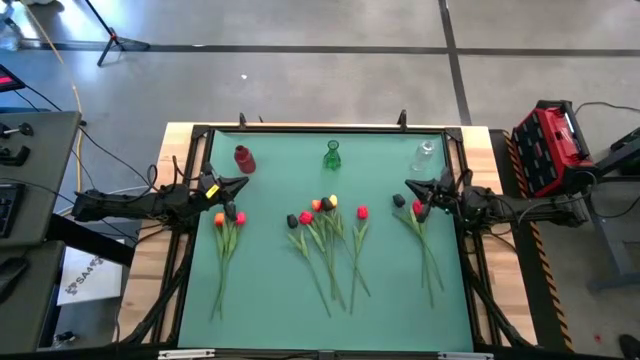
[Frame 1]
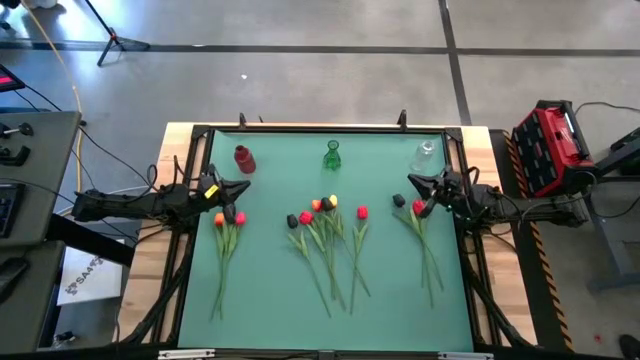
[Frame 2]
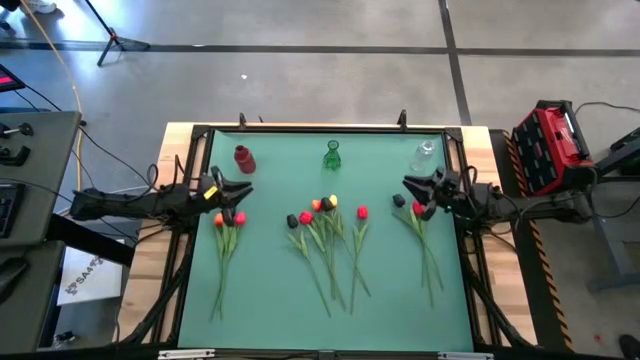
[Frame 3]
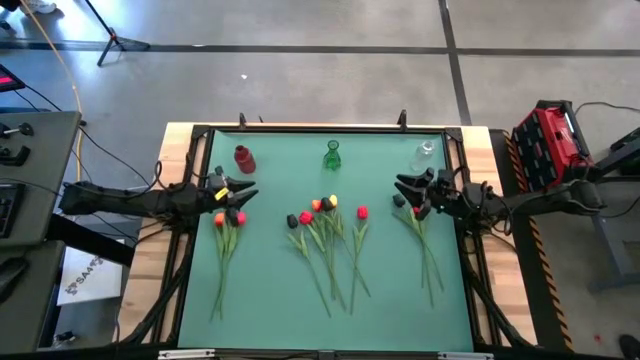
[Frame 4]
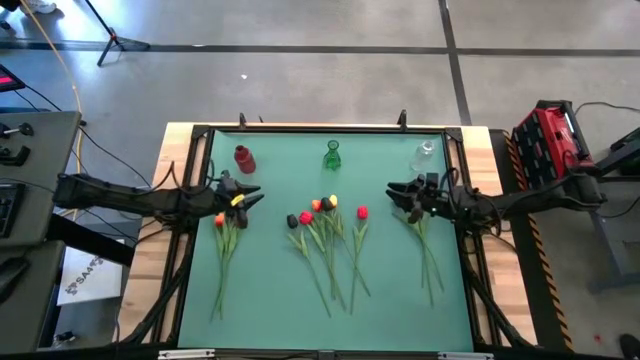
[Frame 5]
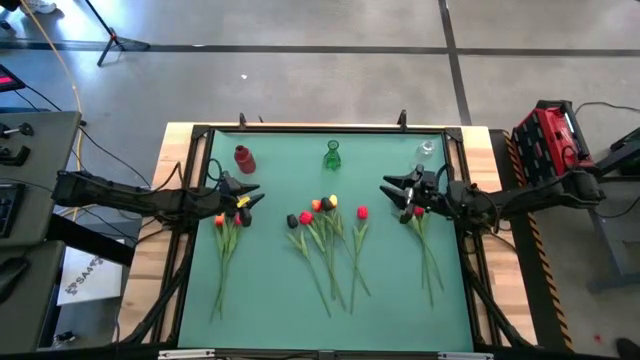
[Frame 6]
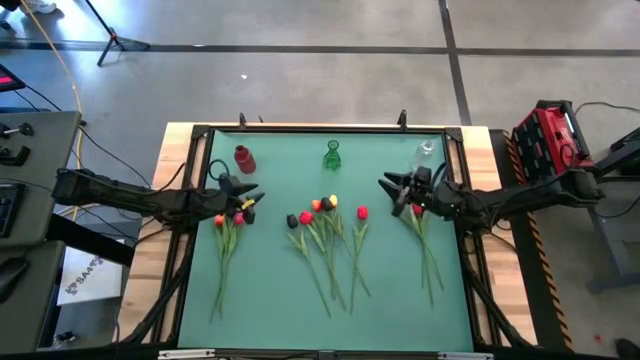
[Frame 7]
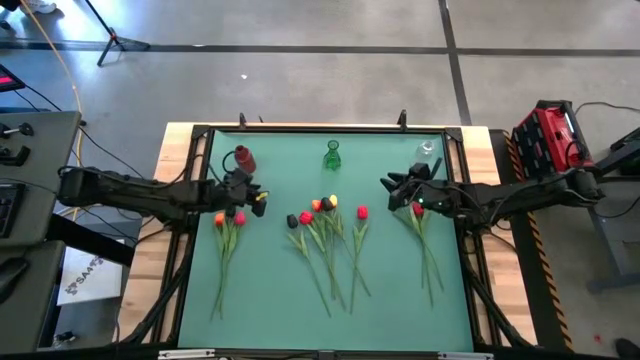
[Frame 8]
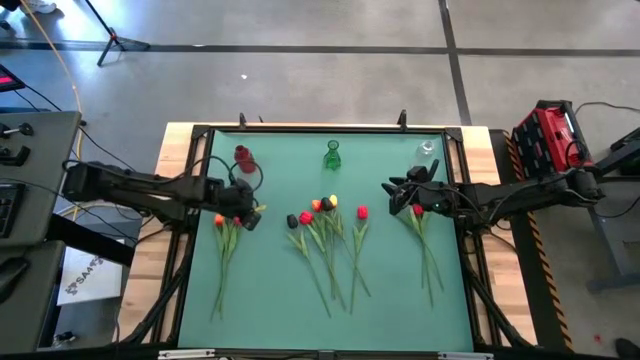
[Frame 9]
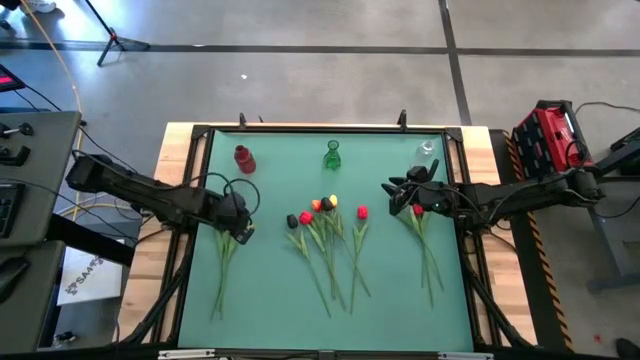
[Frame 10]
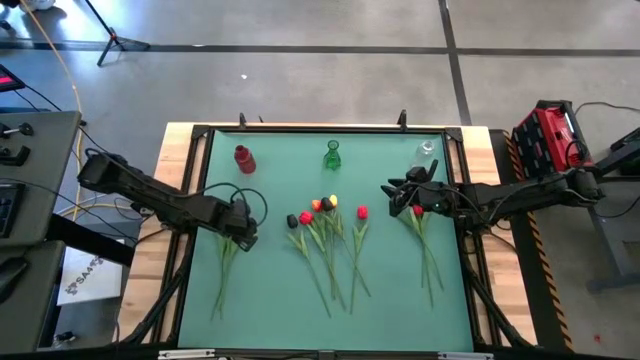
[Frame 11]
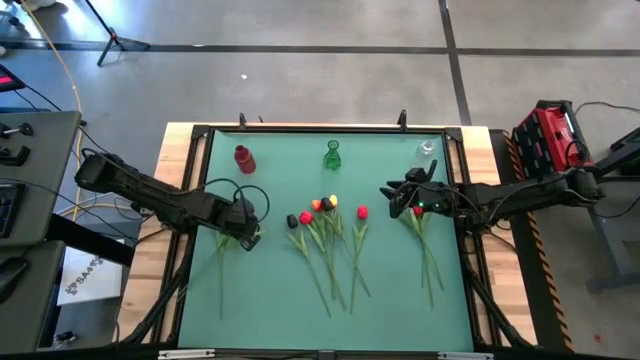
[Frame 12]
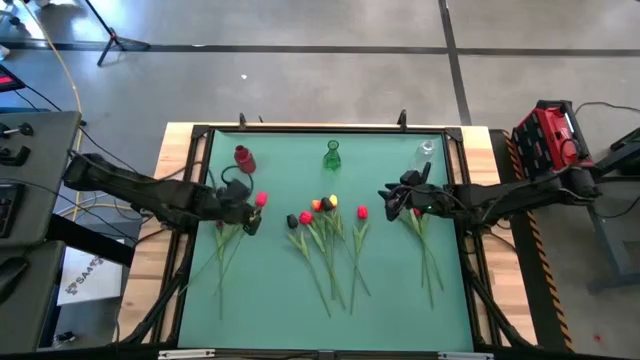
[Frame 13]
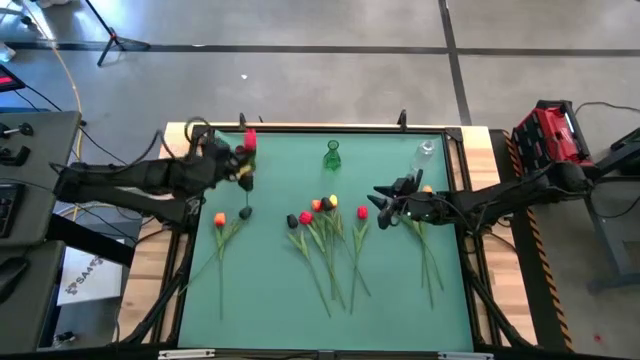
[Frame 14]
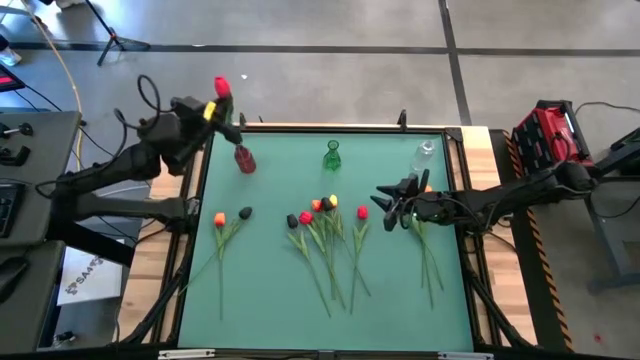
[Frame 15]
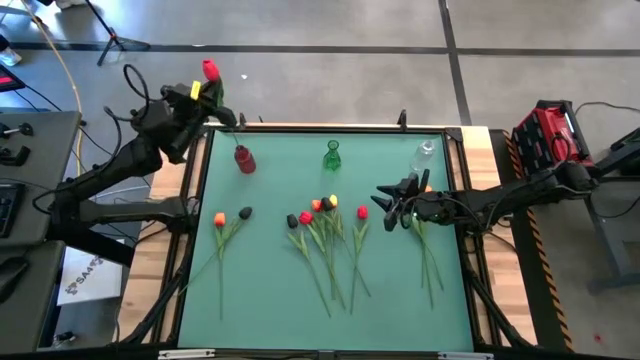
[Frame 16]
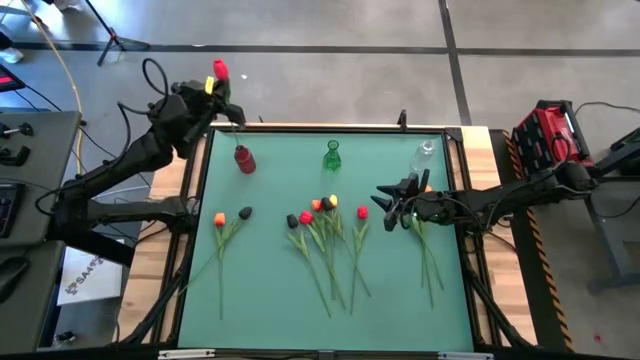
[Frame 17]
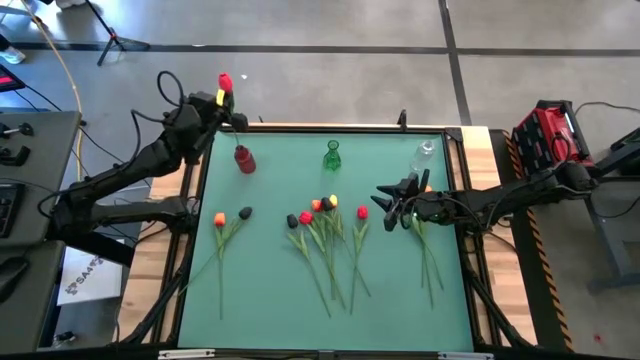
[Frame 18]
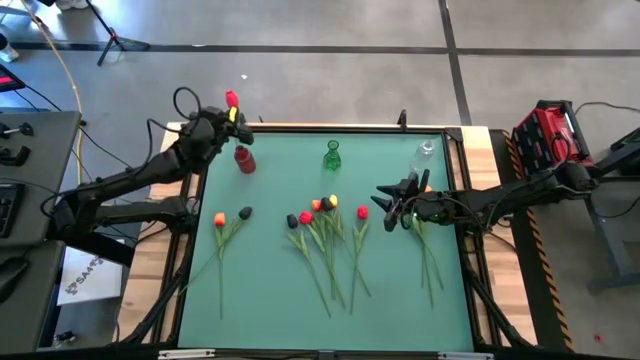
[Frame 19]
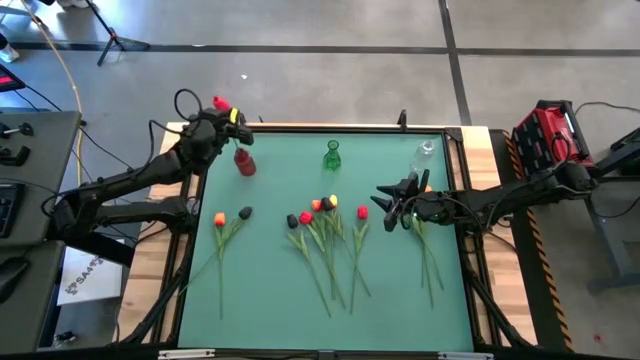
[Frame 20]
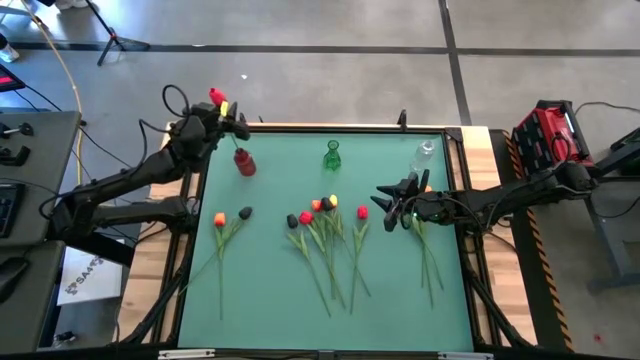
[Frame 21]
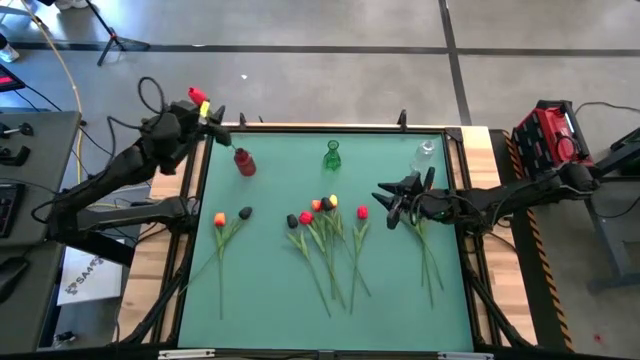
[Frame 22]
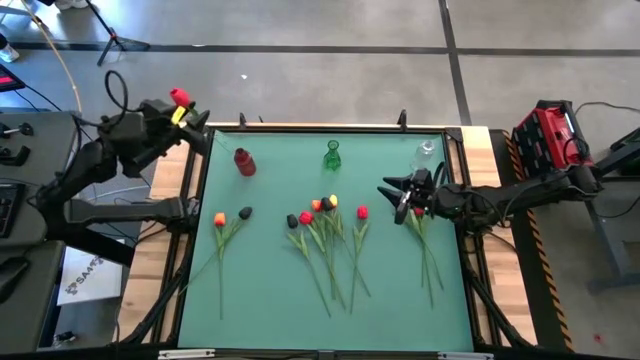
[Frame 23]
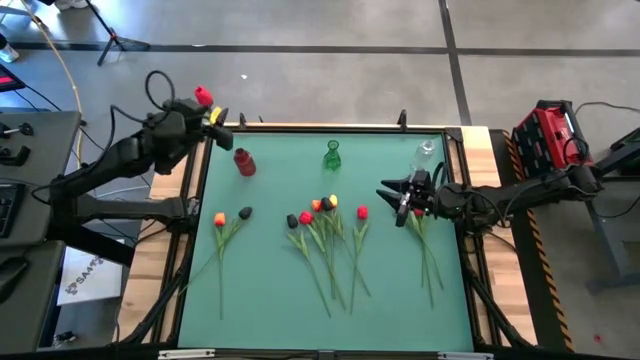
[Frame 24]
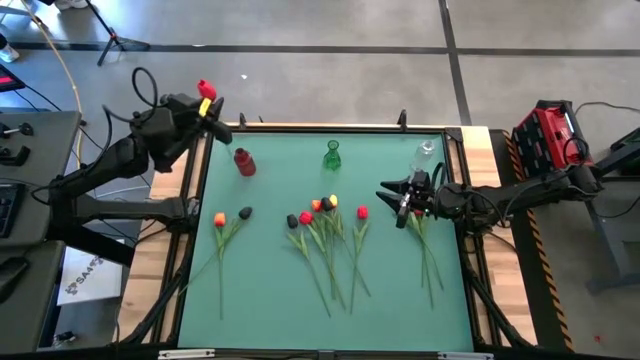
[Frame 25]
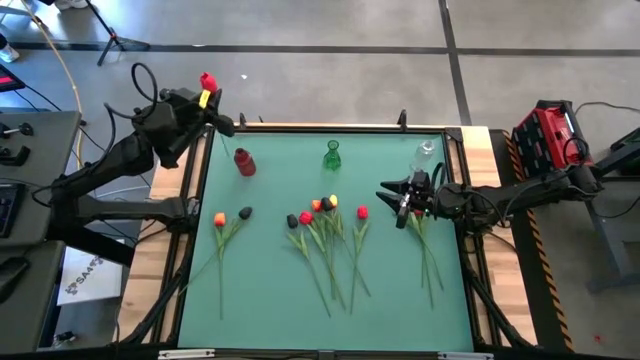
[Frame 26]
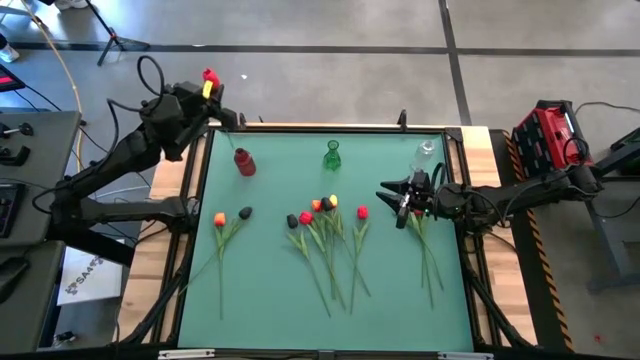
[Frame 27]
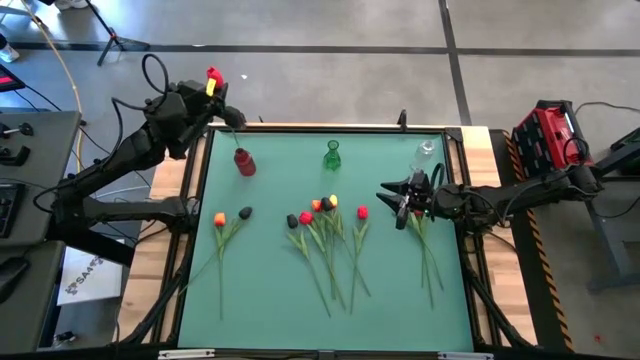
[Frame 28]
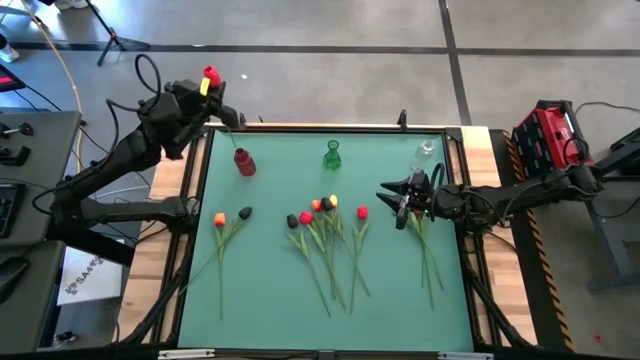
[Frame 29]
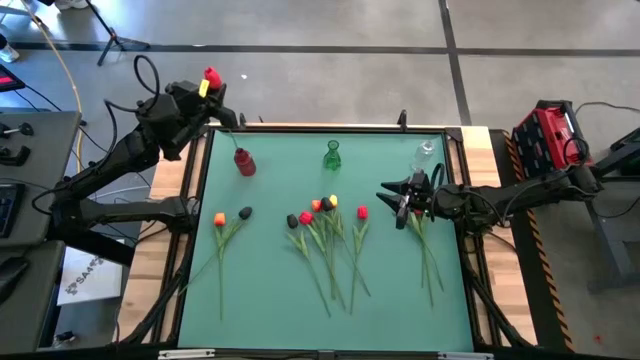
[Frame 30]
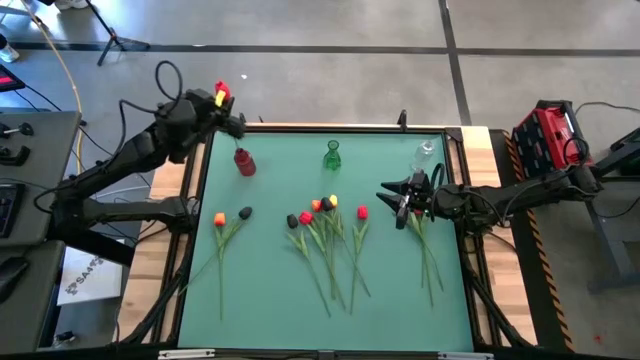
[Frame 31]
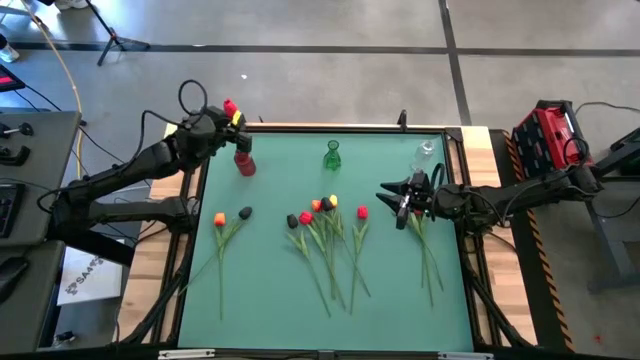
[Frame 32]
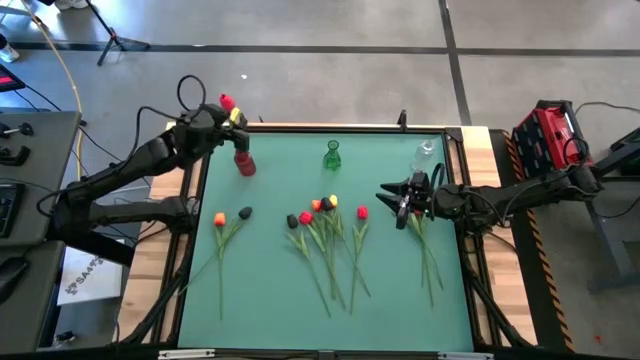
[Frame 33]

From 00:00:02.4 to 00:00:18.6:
Task: Sort flowers into vase by color
Put the left red tulip into the red vase

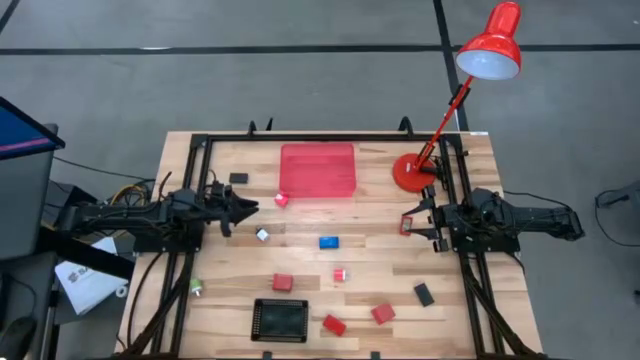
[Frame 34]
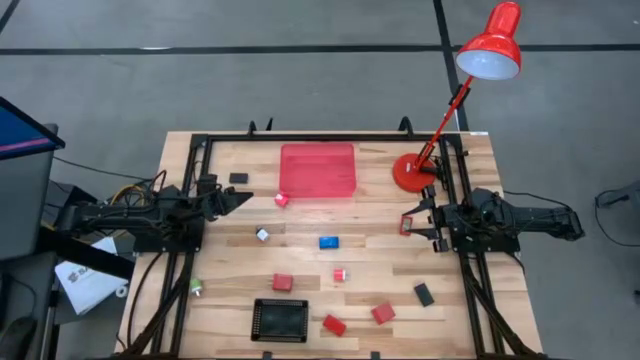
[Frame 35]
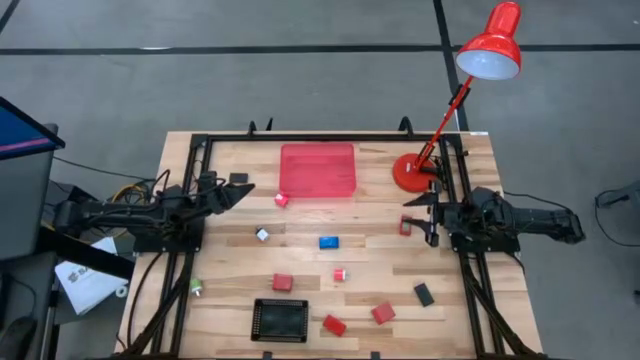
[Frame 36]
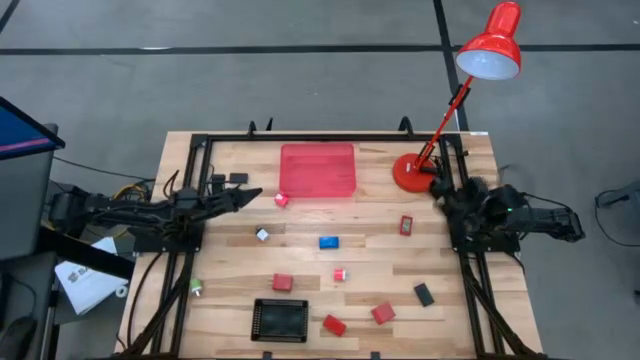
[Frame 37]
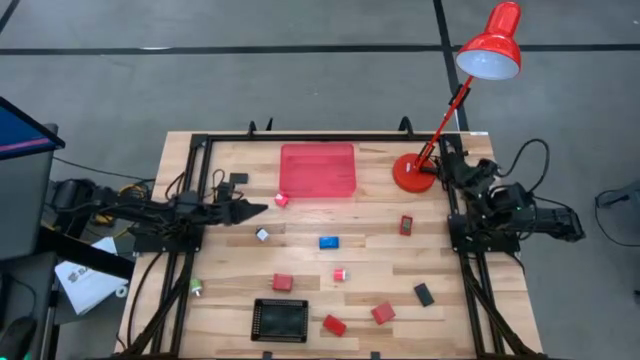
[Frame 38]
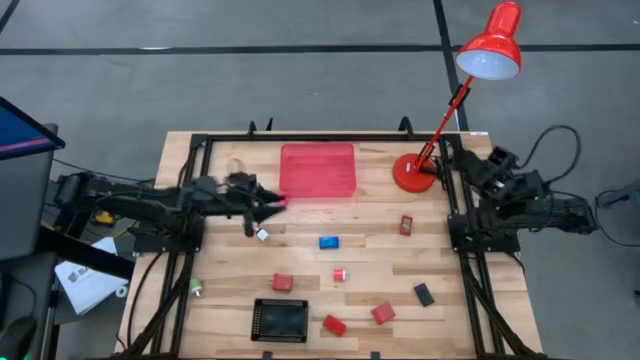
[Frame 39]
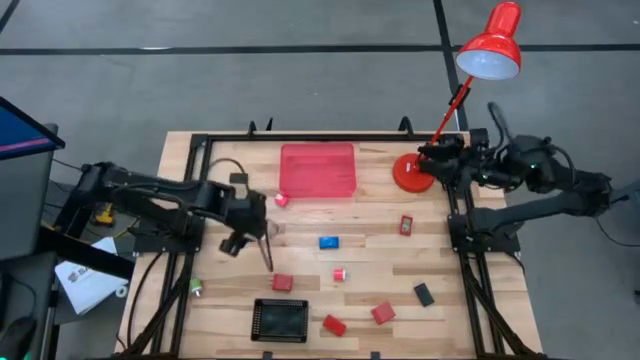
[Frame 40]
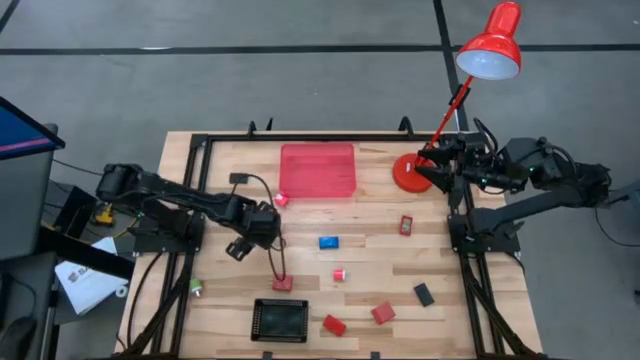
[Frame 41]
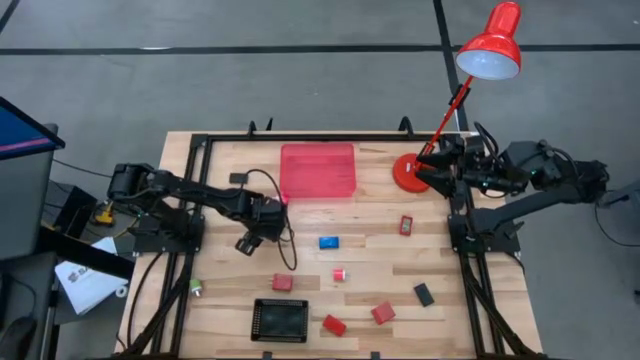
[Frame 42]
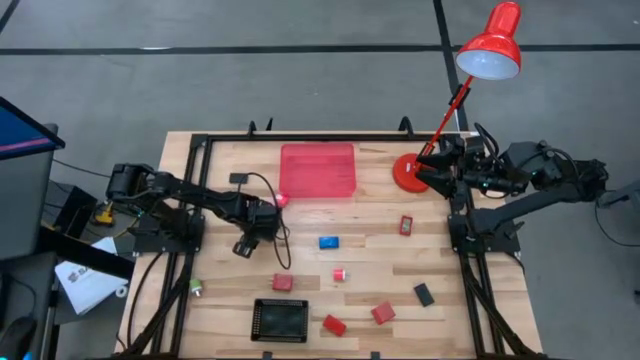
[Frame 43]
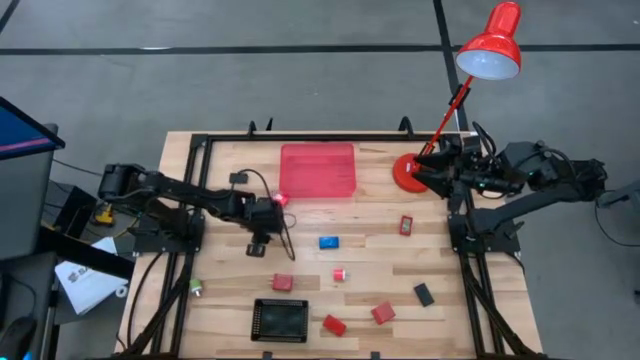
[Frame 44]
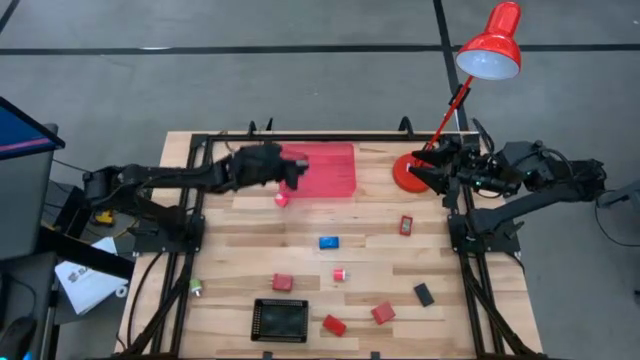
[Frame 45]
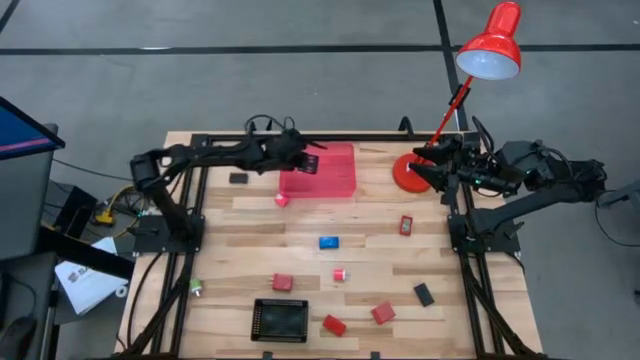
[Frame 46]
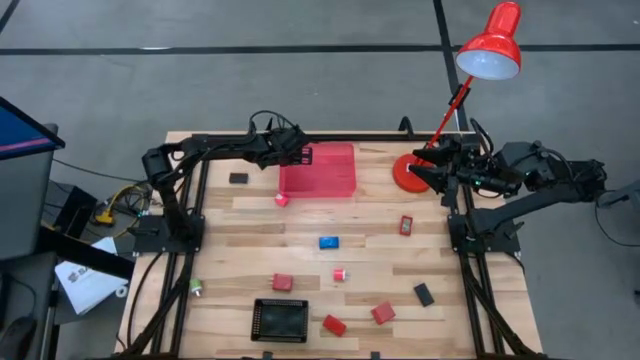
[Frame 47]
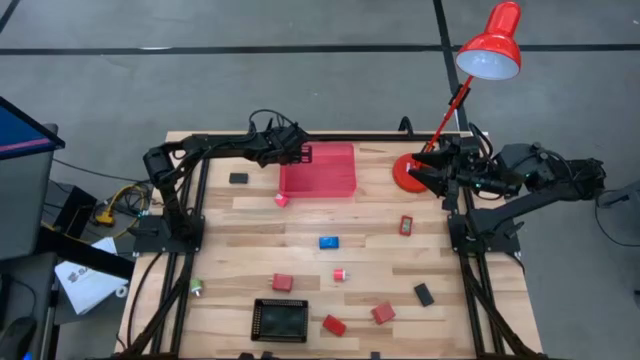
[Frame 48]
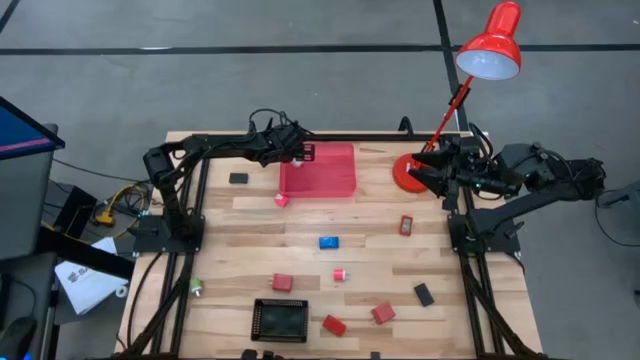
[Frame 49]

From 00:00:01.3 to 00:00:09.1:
Task: Pick & Place Office items
Put the white and black charger adapter into the pink bin
